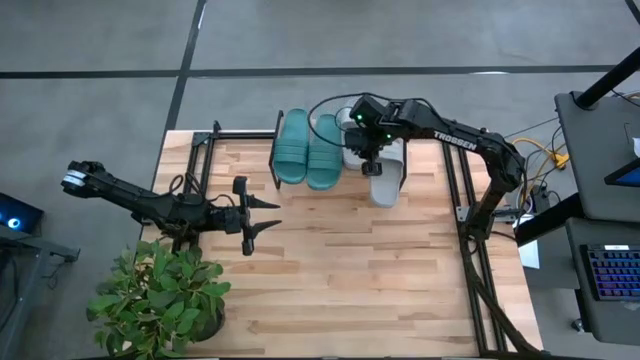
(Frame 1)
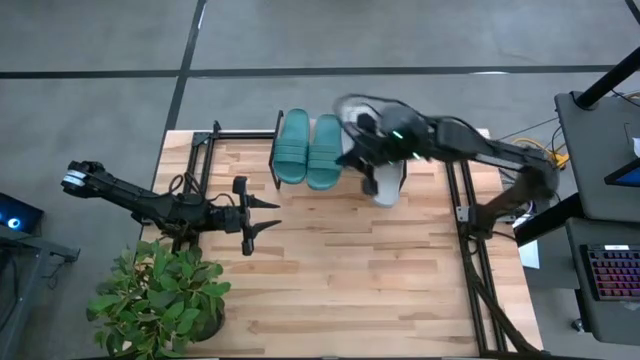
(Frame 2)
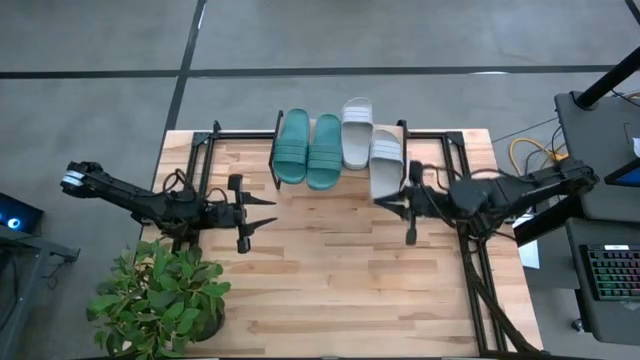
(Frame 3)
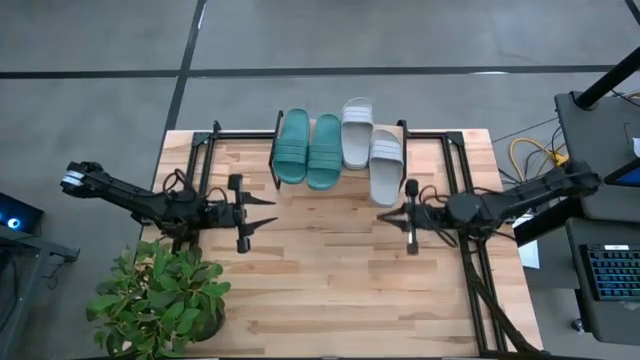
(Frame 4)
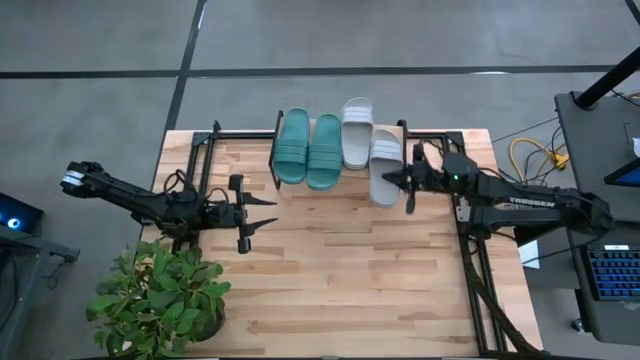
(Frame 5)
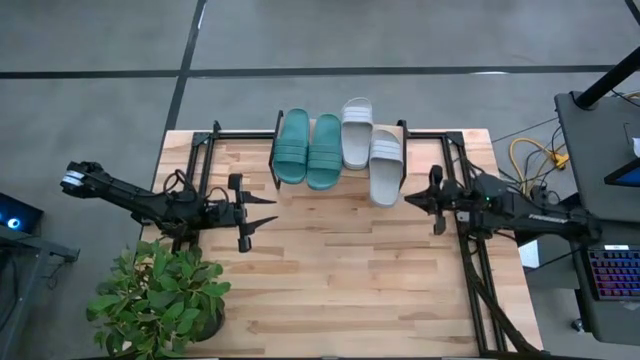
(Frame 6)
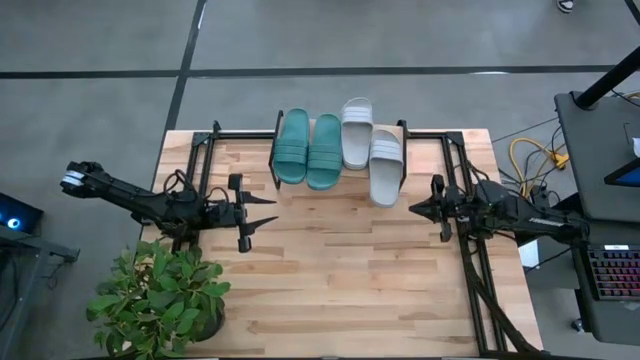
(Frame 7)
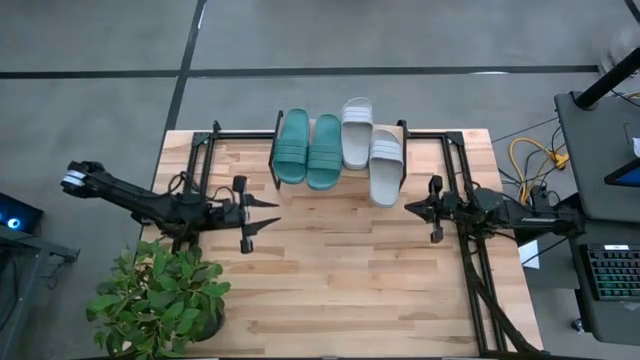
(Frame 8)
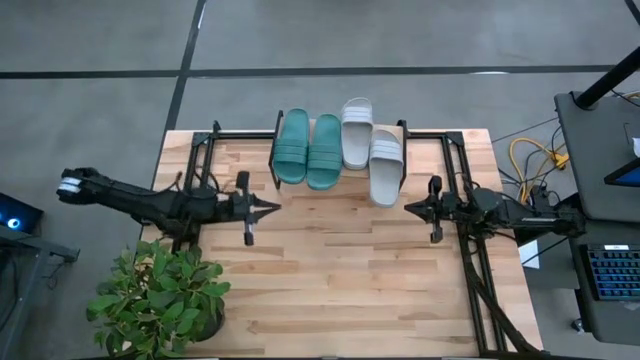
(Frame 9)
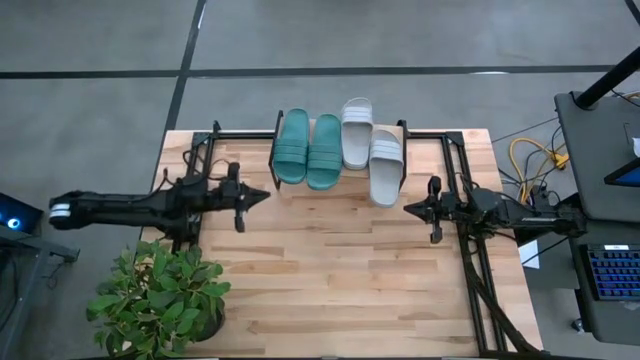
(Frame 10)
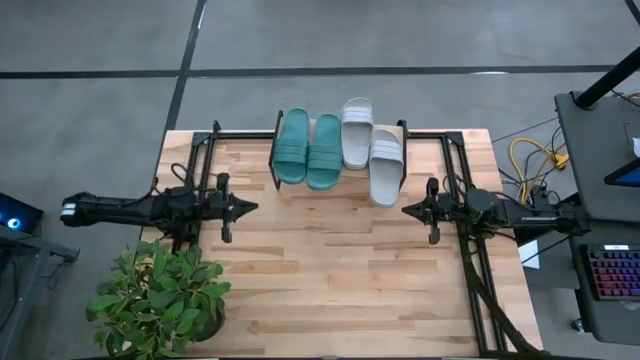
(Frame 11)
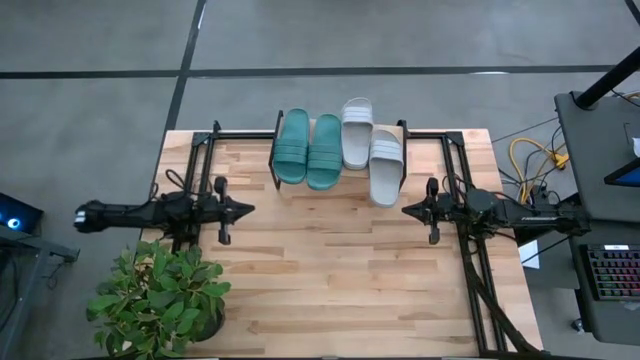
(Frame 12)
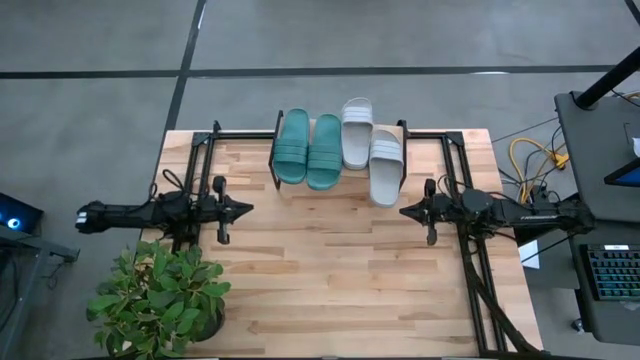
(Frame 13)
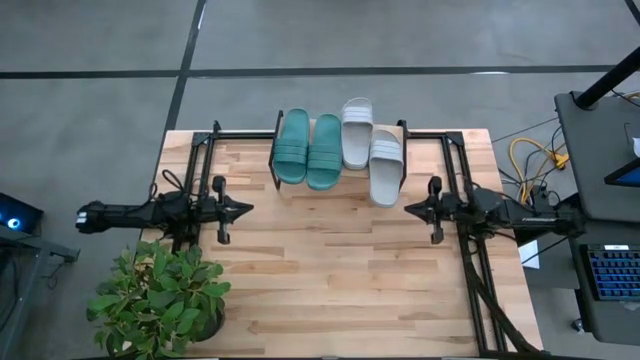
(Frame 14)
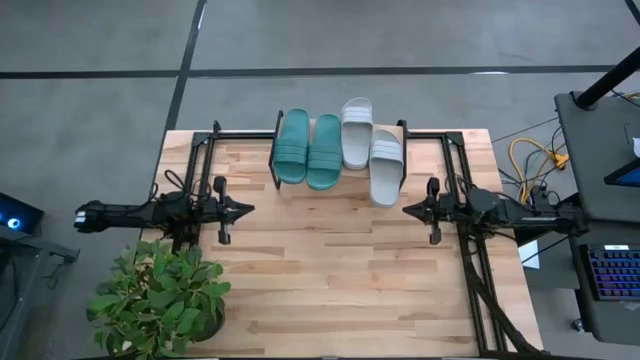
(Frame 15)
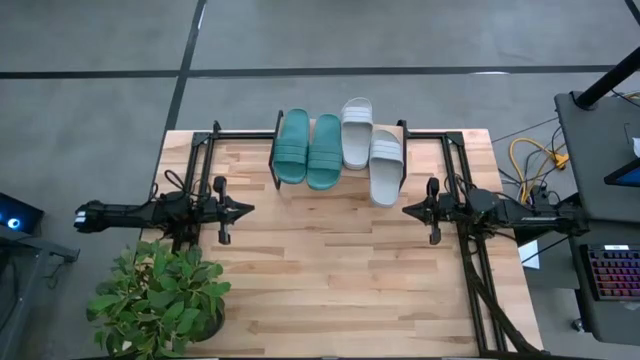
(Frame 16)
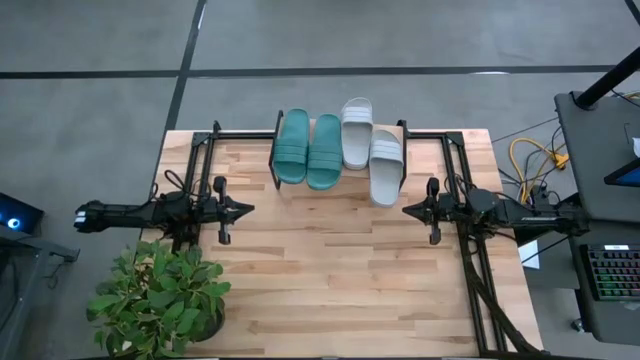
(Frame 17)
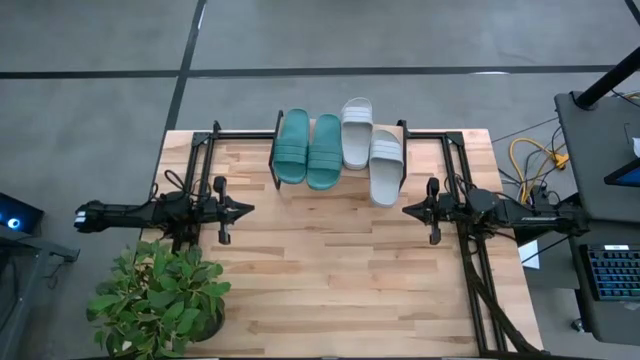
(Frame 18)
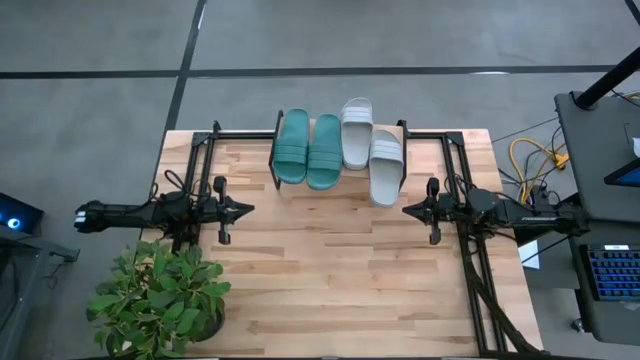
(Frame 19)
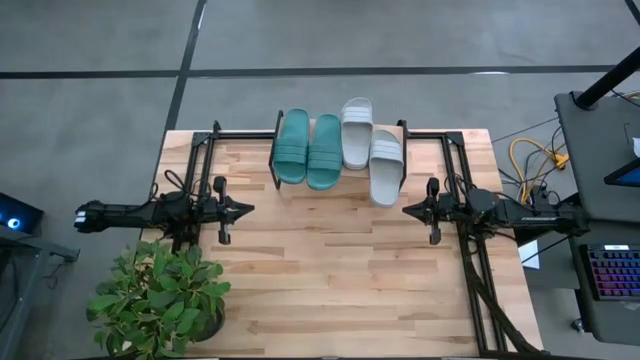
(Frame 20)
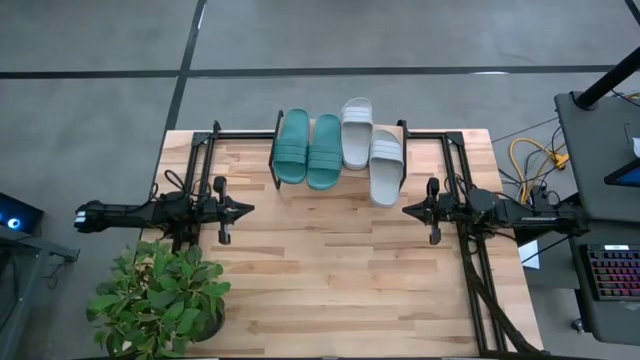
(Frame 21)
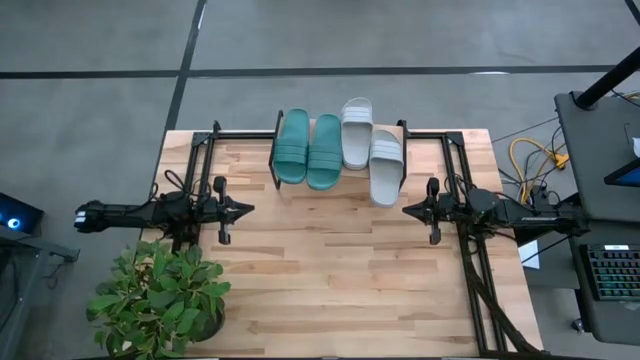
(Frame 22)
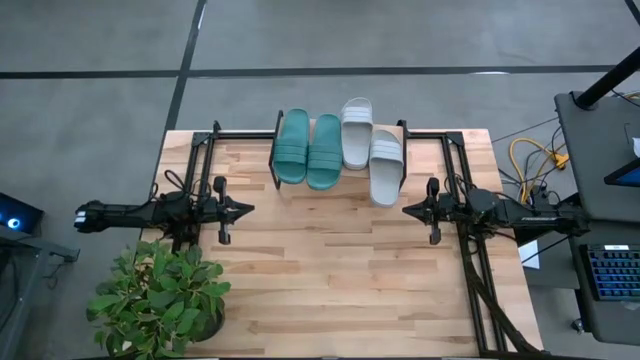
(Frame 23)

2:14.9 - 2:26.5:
Task: Pick and place slides into the shelf
Return to Home Position

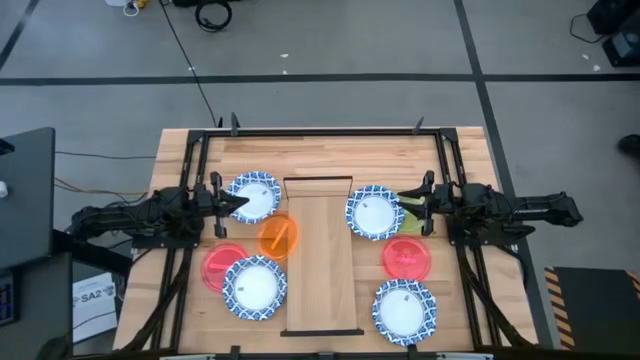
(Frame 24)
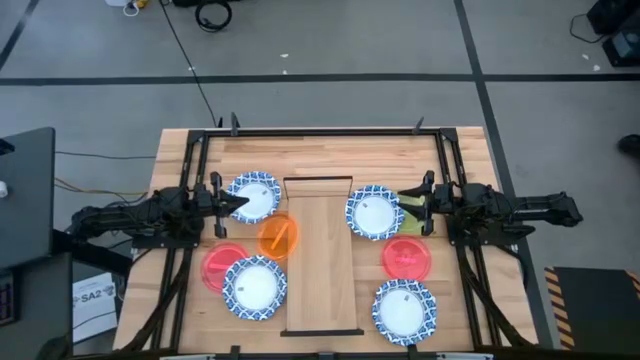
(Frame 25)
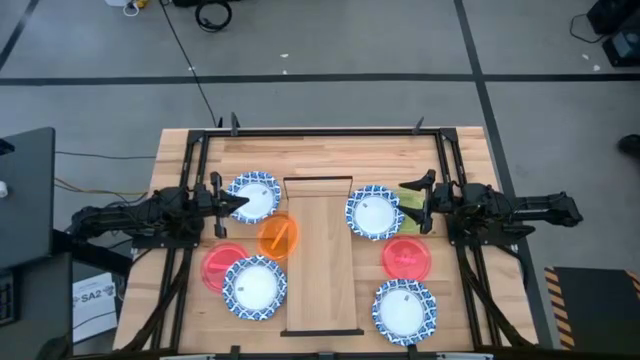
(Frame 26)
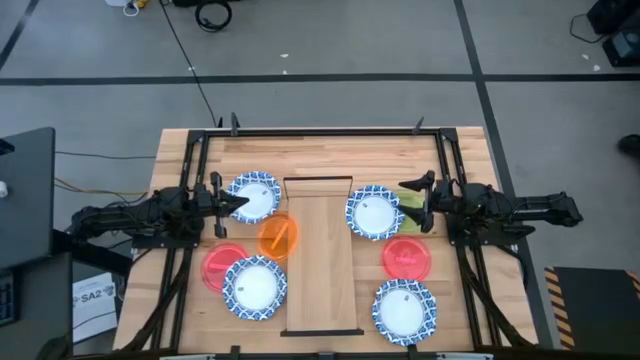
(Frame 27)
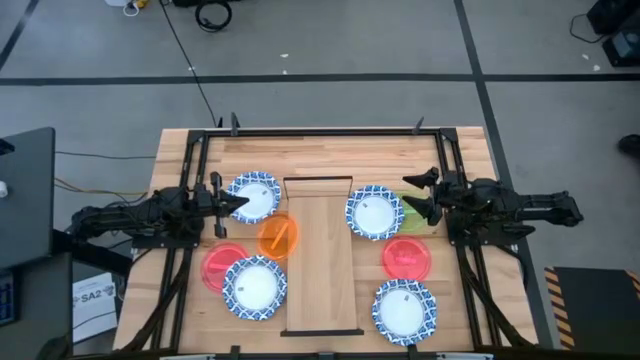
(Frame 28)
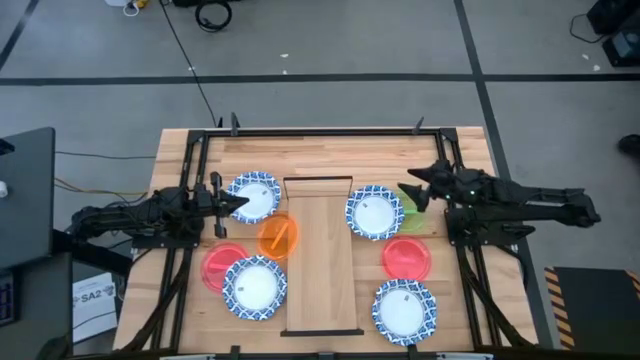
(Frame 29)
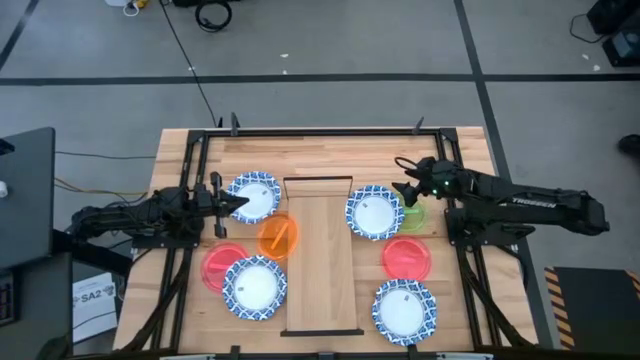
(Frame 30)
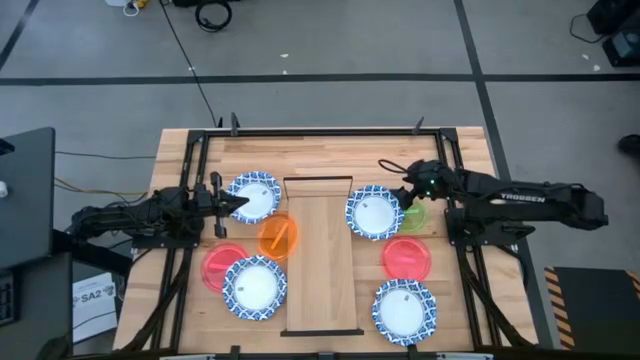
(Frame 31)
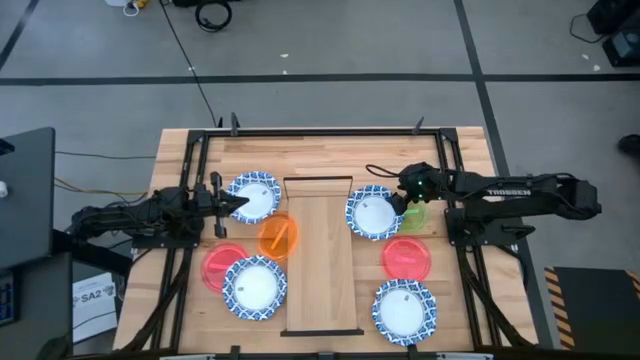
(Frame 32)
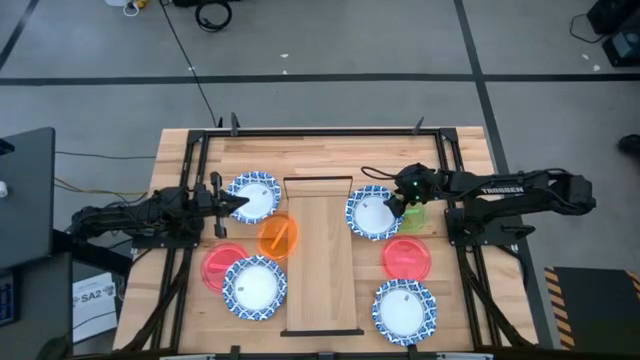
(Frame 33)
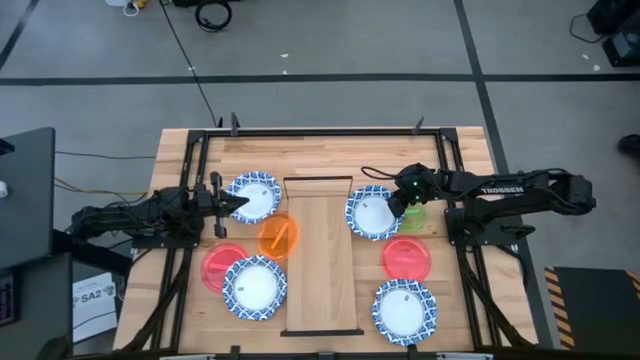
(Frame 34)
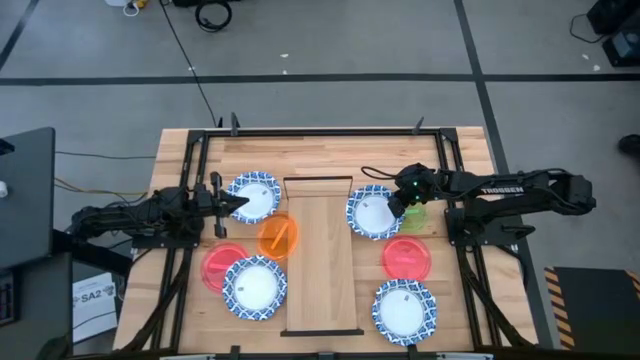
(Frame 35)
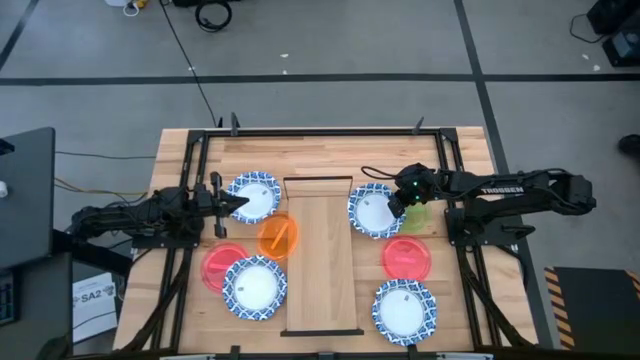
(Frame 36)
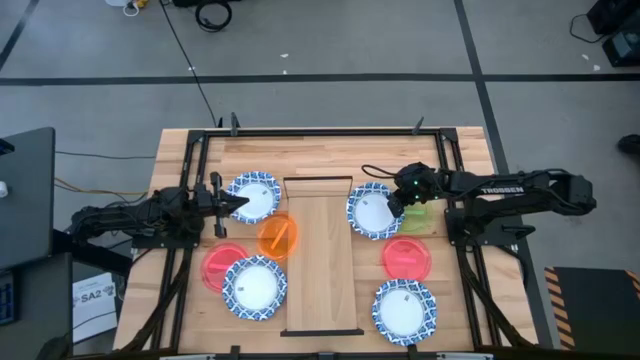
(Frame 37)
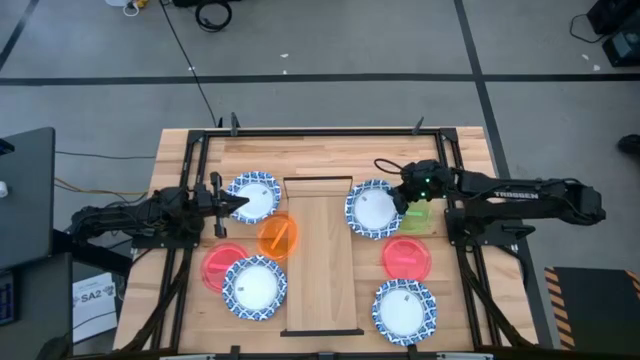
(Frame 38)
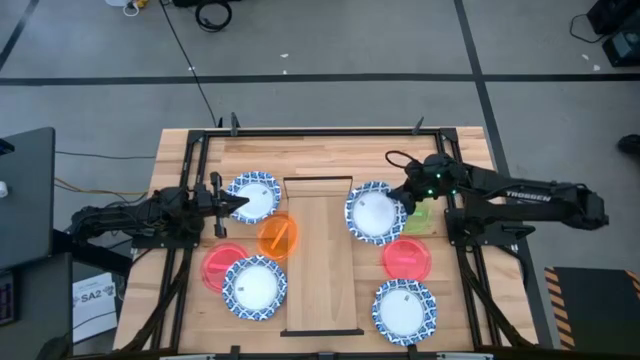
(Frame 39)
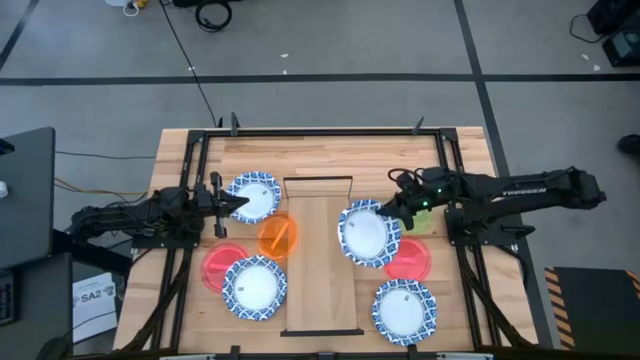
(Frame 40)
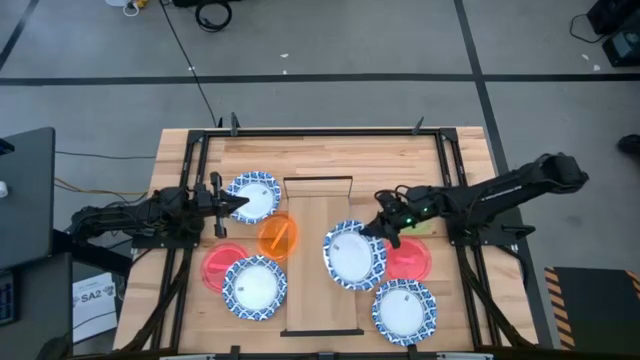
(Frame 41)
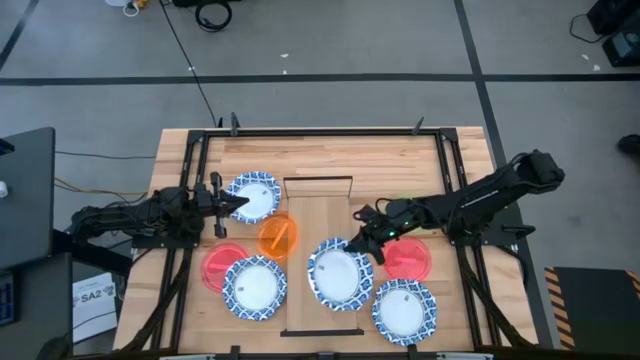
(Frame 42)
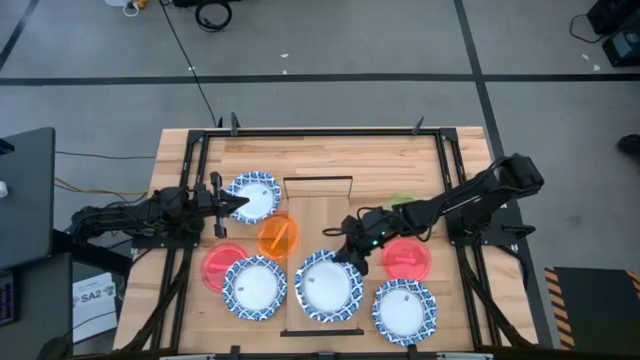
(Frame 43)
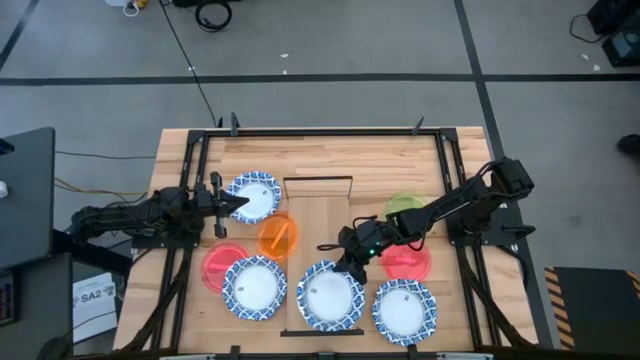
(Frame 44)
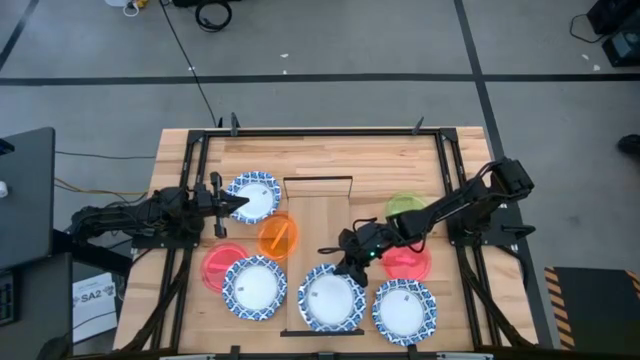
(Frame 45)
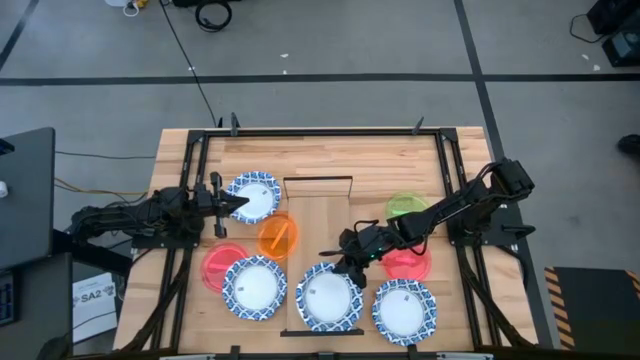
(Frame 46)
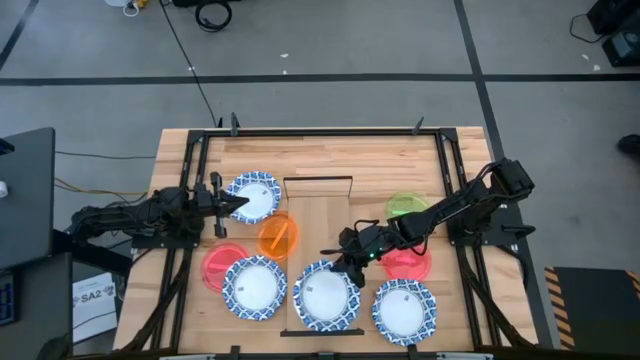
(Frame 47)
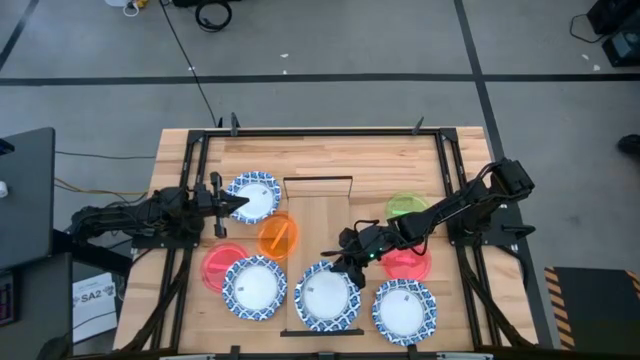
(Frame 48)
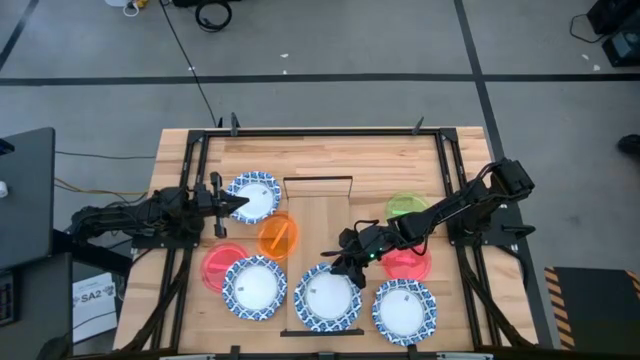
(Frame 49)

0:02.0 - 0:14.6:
Task: Place and stack plates onto a shelf
Put the blue patterned bowl on the shelf
